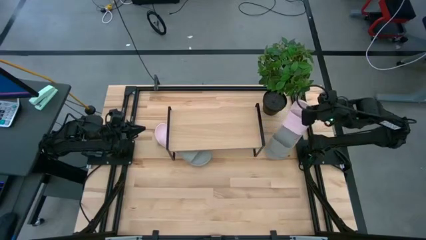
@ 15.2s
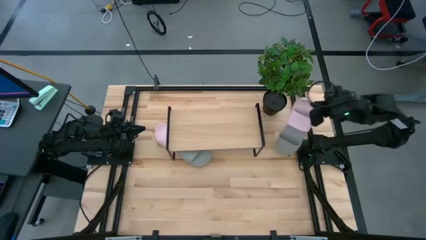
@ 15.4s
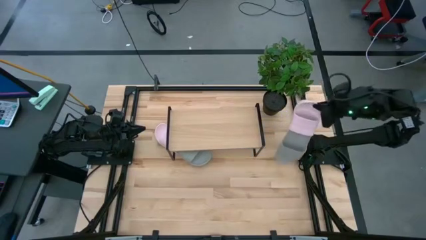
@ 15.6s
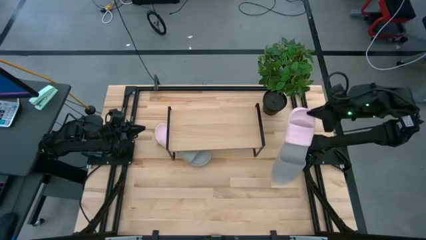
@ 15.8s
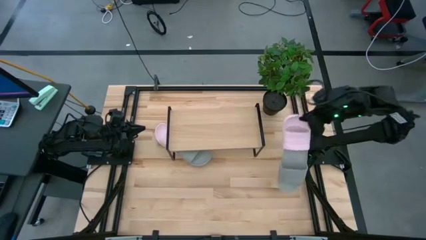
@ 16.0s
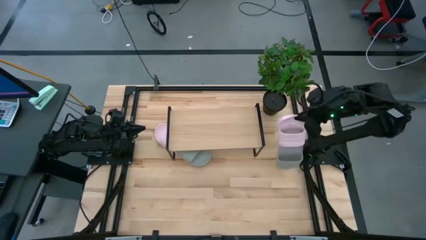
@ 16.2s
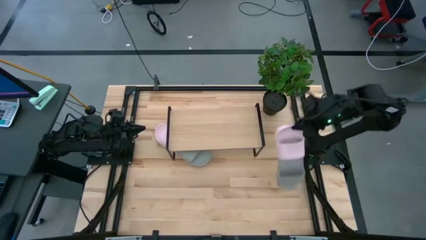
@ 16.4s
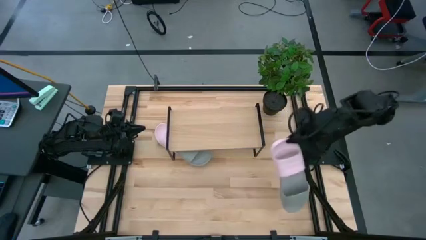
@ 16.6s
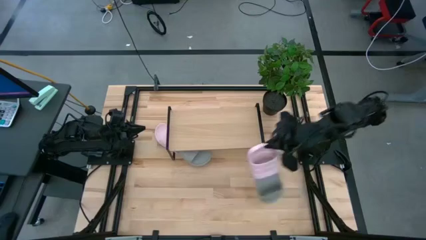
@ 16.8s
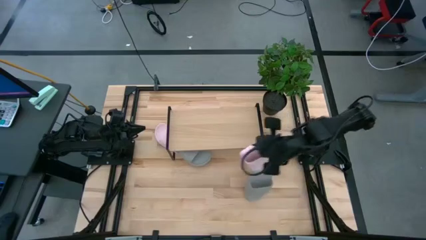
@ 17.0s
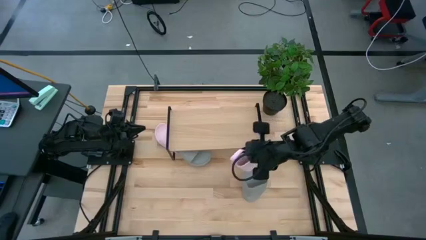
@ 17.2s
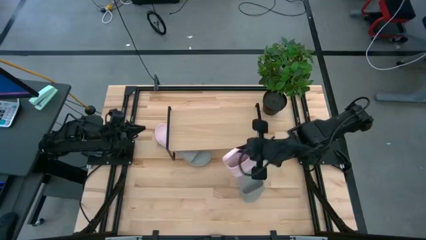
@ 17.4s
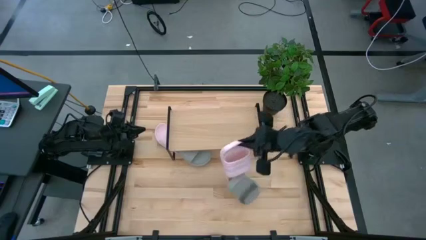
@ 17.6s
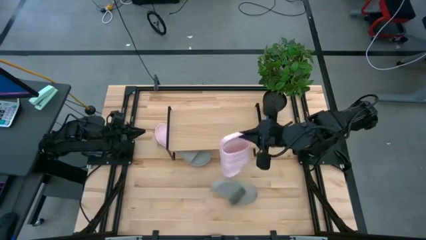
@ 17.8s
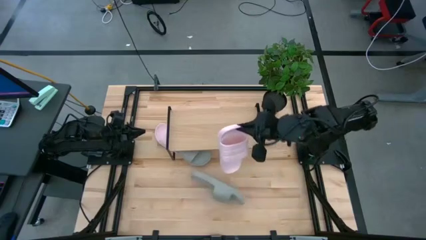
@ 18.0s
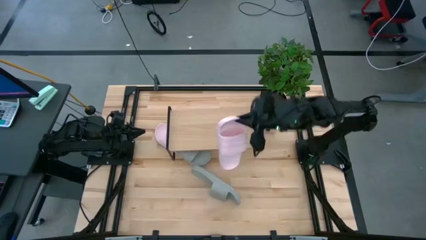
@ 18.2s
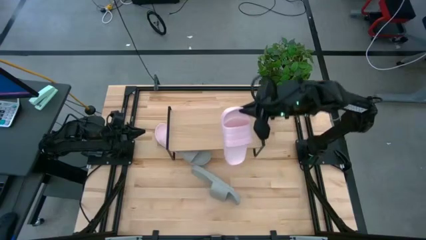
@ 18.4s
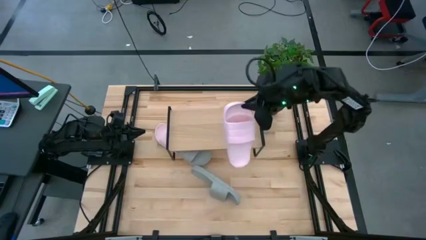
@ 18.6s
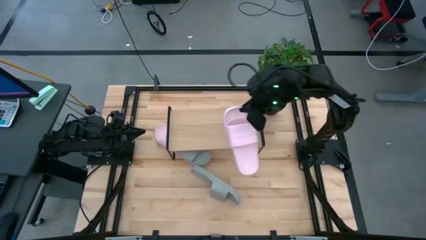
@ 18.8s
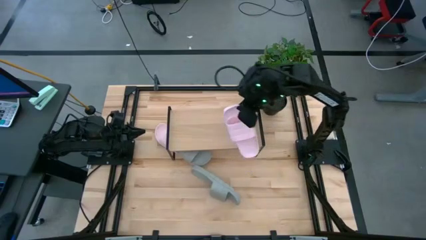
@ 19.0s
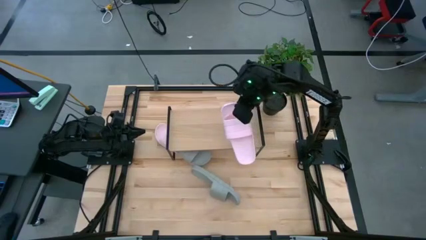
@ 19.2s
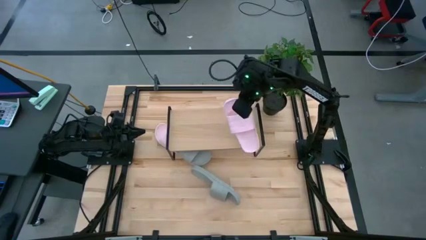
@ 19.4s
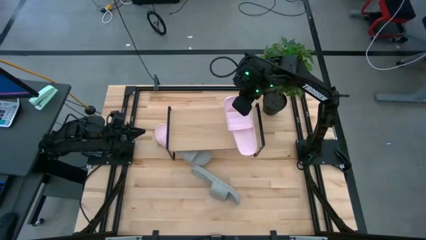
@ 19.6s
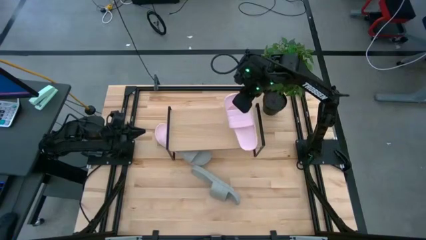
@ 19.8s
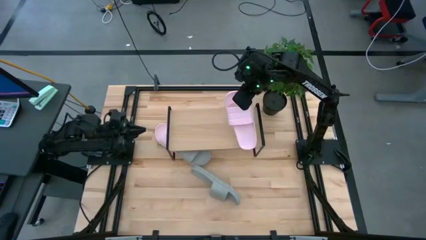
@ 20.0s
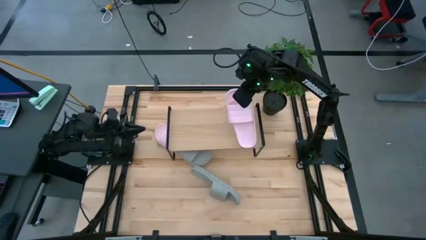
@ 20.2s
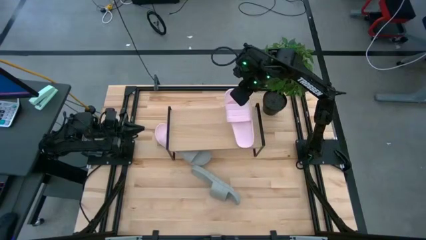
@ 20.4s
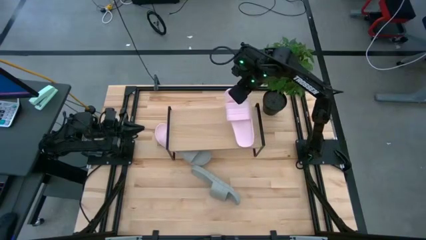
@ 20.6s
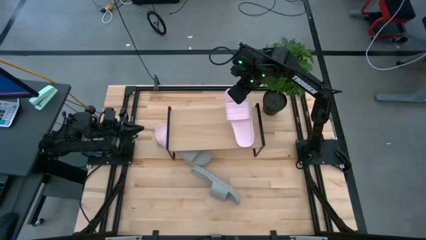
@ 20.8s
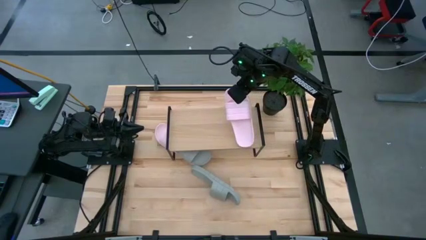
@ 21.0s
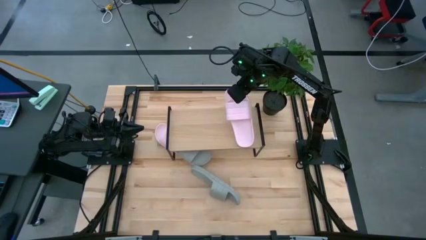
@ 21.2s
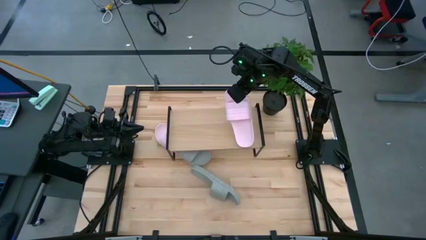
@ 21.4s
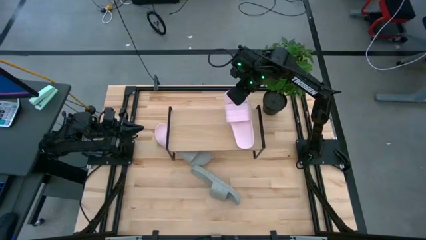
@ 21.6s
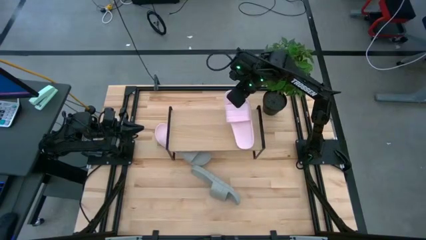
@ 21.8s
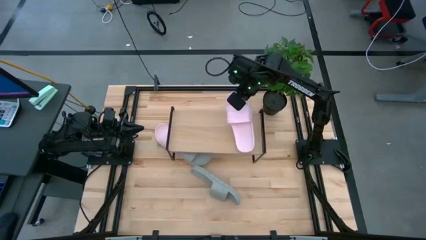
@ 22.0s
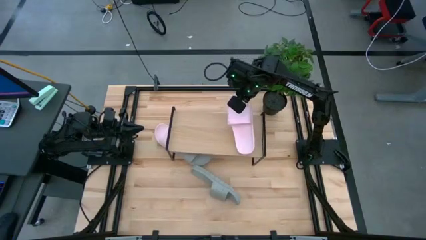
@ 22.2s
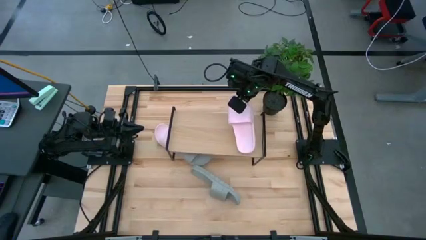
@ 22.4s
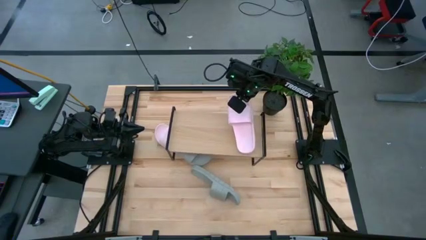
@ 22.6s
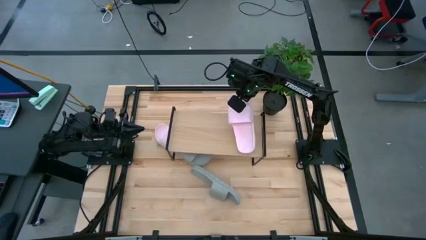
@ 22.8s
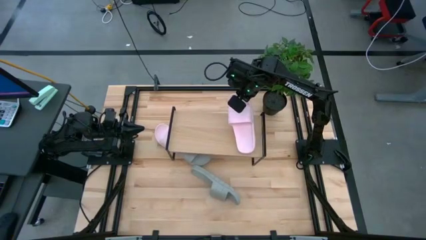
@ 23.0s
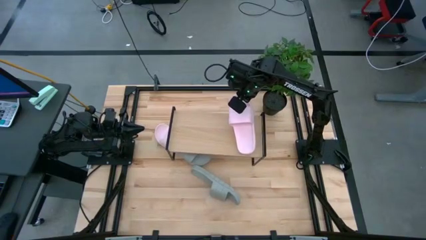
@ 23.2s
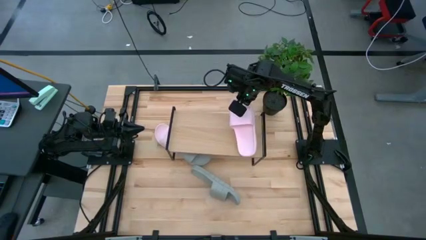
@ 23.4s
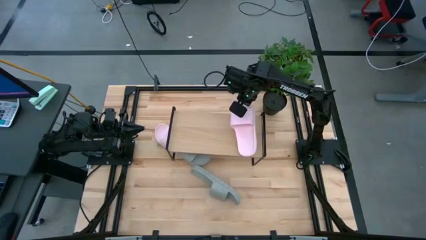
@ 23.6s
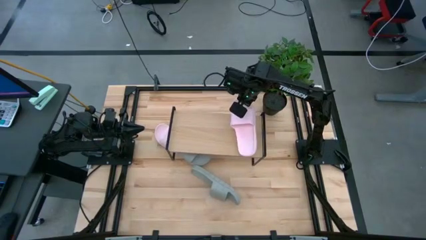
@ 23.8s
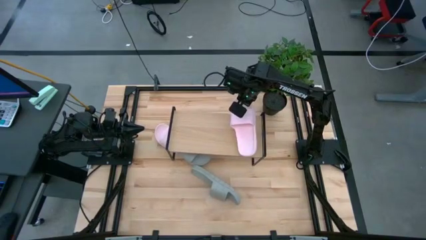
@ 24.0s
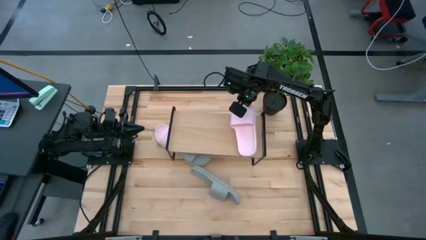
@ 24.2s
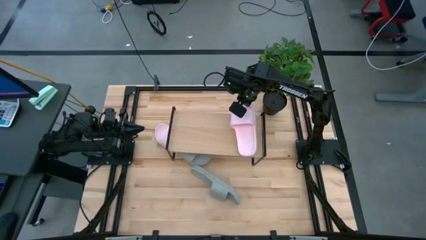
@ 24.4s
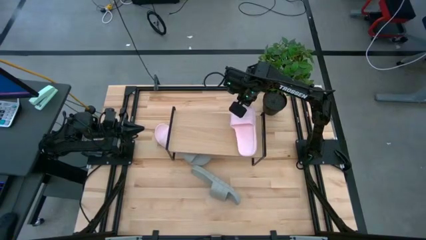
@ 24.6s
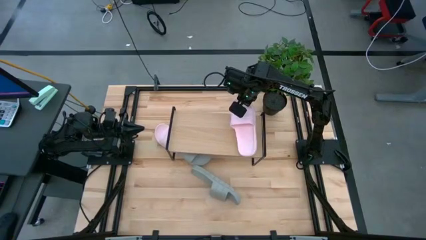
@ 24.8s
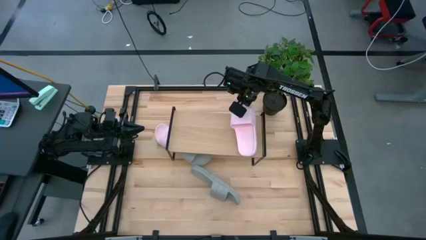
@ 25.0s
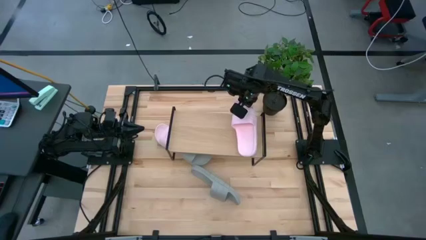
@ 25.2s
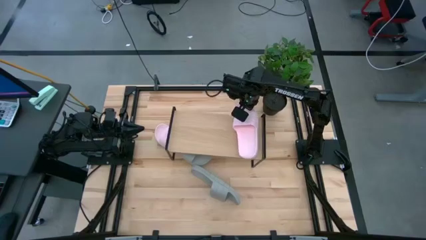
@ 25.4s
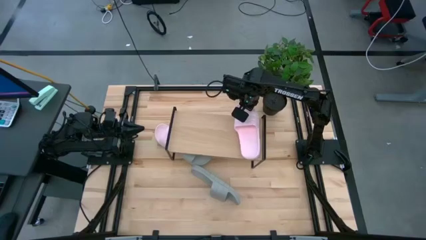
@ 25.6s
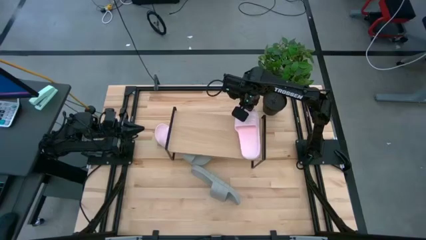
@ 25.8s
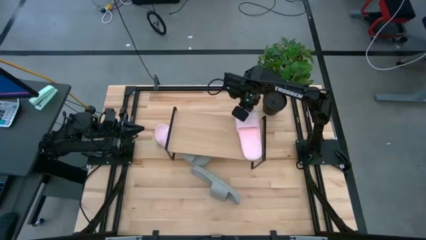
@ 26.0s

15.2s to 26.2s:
Task: Pick and place slides into the shelf
Put the right pink slide on the shelf

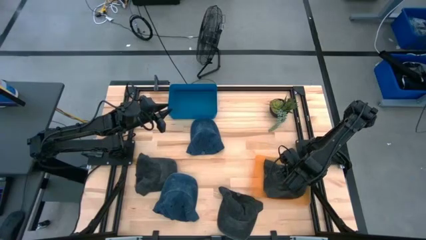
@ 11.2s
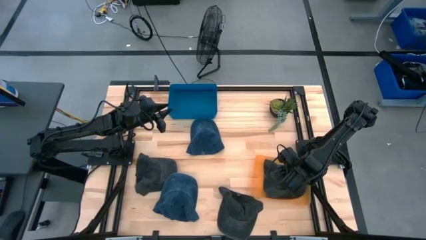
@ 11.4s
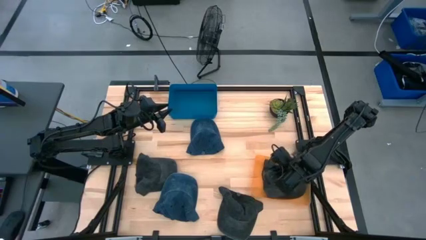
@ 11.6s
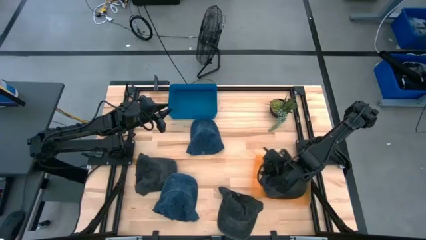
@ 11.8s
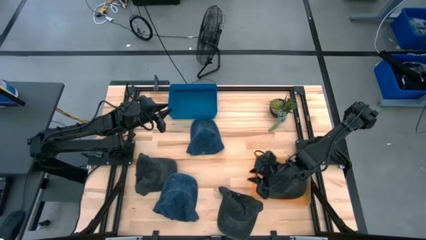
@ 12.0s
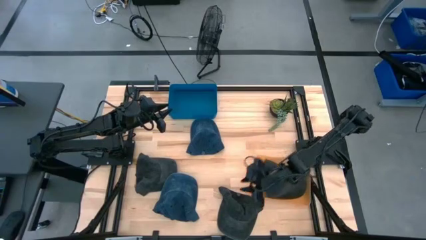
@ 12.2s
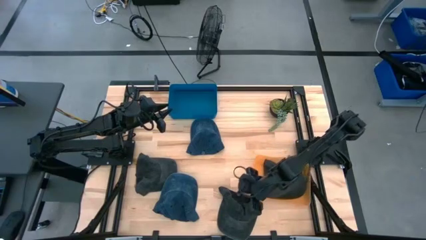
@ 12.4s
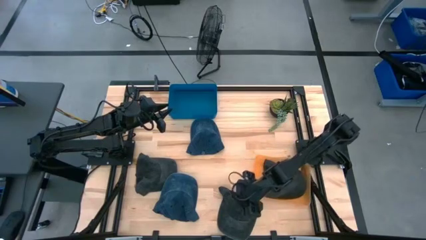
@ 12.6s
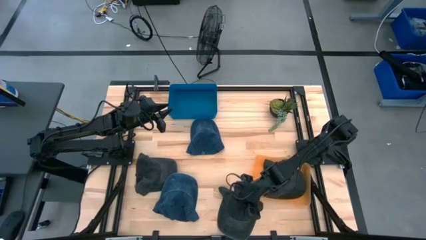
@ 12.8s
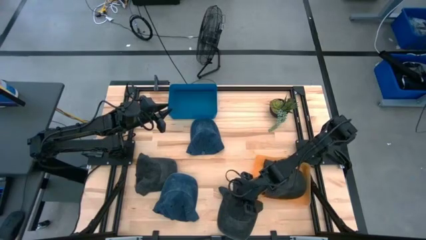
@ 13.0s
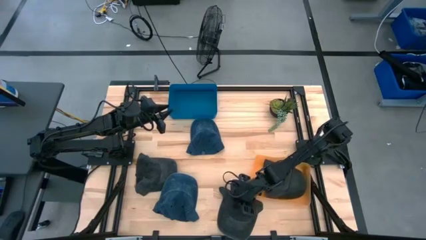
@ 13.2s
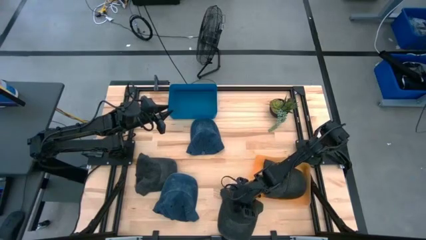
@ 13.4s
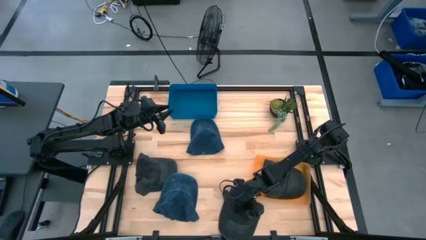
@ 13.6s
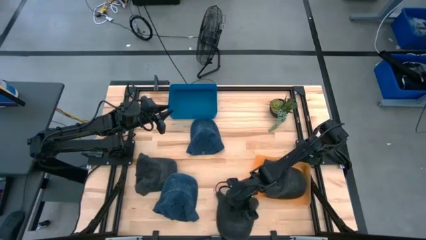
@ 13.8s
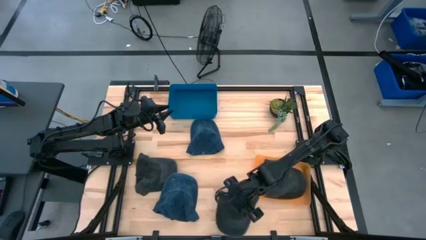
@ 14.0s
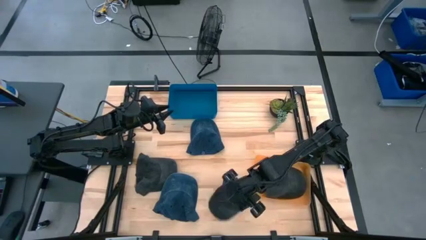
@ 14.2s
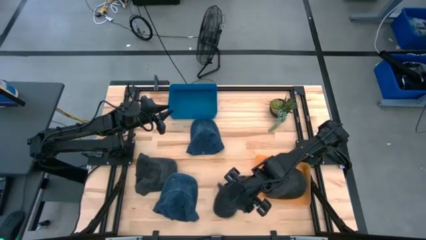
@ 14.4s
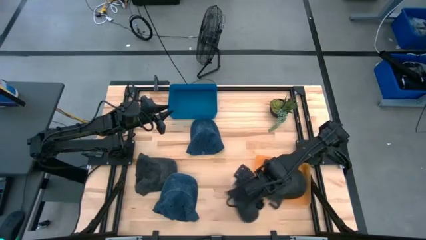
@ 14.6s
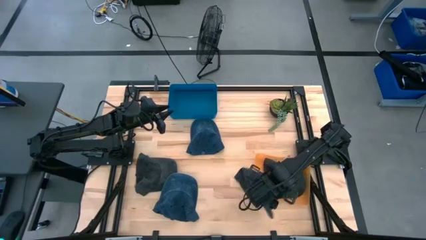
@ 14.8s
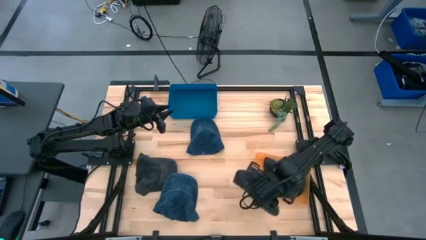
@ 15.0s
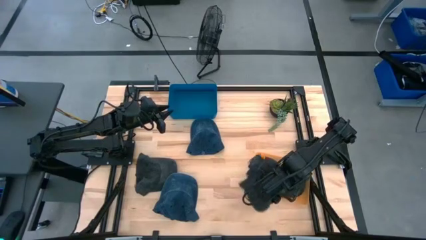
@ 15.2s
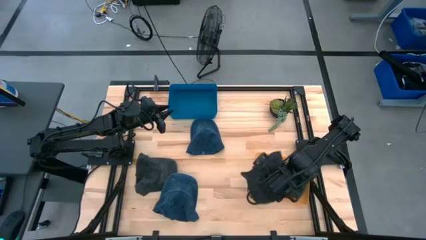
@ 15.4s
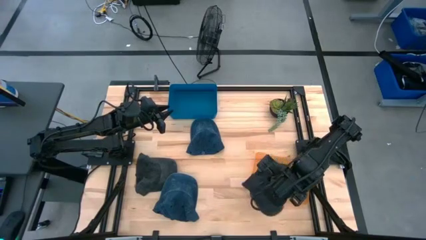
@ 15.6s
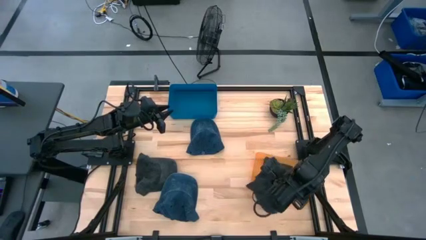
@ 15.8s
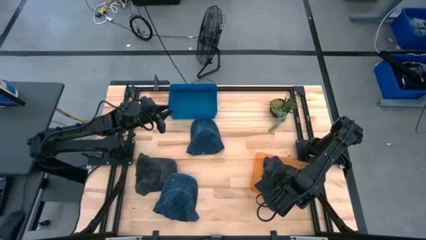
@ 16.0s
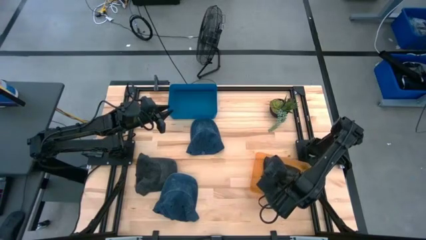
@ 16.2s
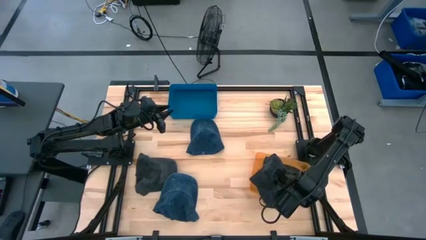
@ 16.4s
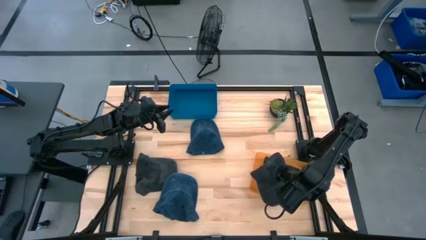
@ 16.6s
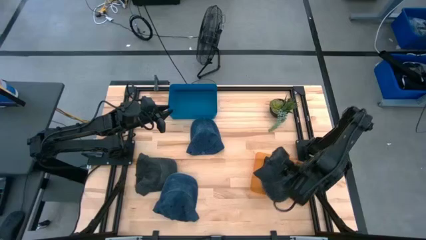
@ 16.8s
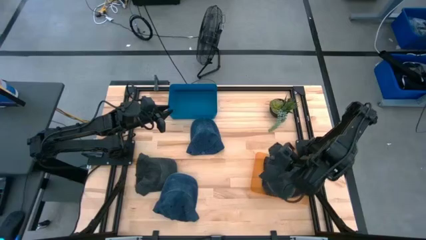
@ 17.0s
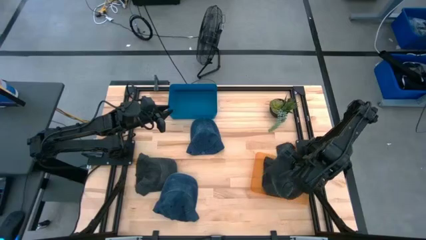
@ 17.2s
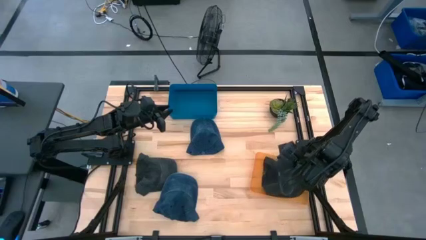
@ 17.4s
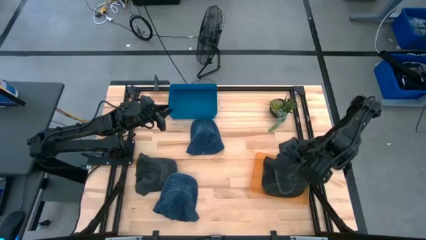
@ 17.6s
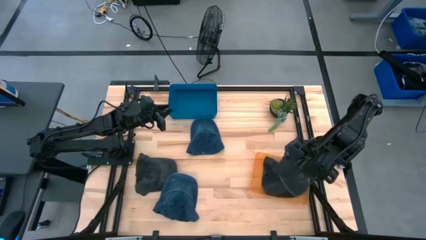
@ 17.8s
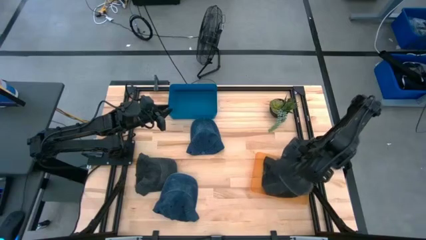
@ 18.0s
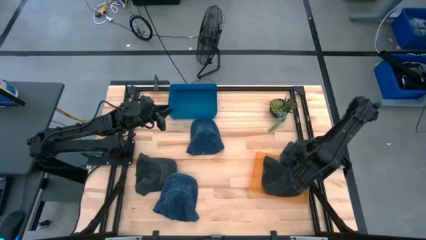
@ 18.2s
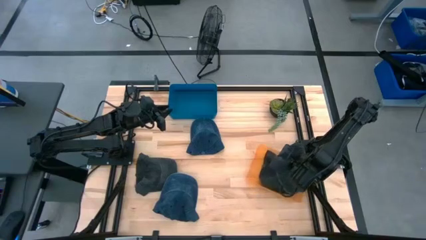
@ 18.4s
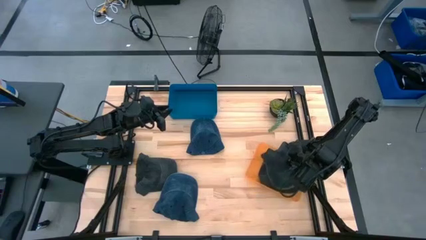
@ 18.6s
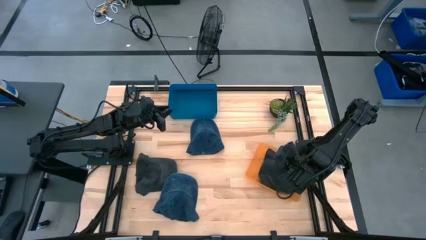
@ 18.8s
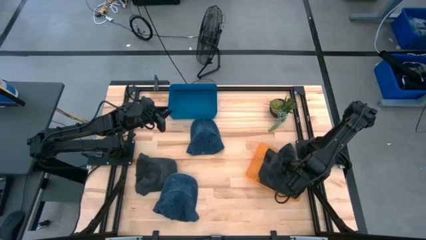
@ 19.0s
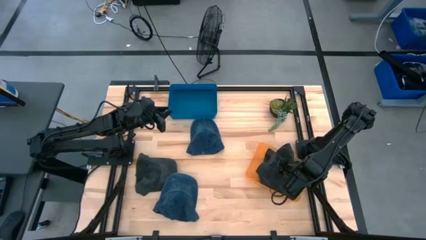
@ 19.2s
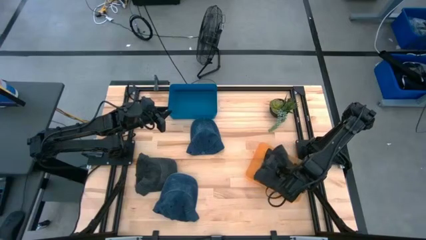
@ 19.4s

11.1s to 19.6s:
Task: Pick & Place hat
Put the bottom black cap into the orange bin
